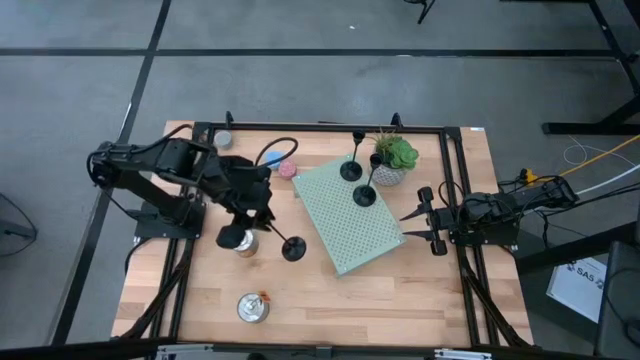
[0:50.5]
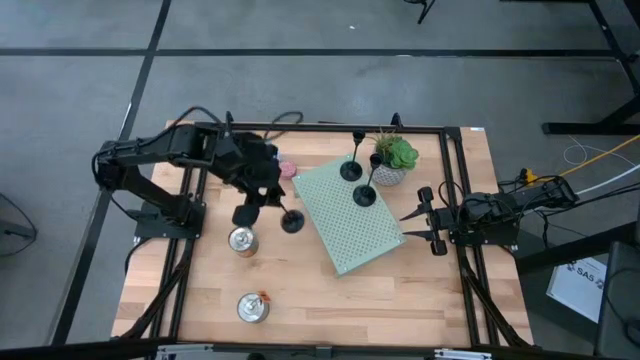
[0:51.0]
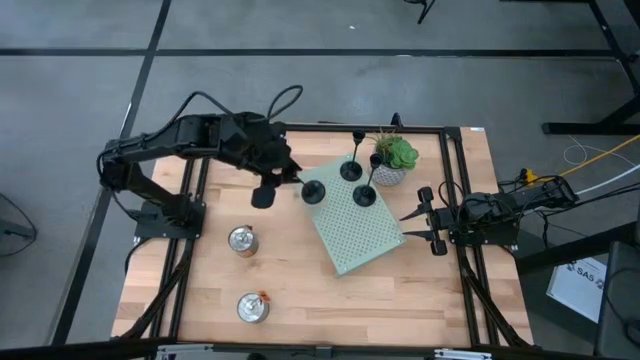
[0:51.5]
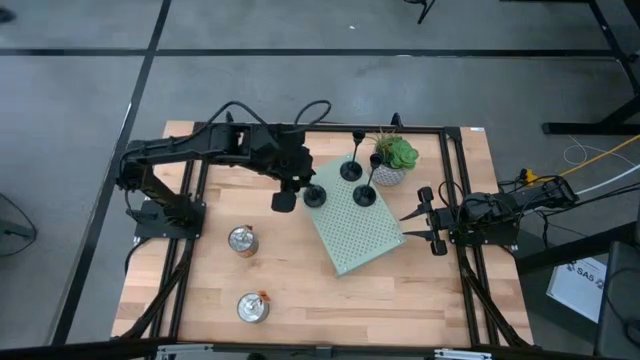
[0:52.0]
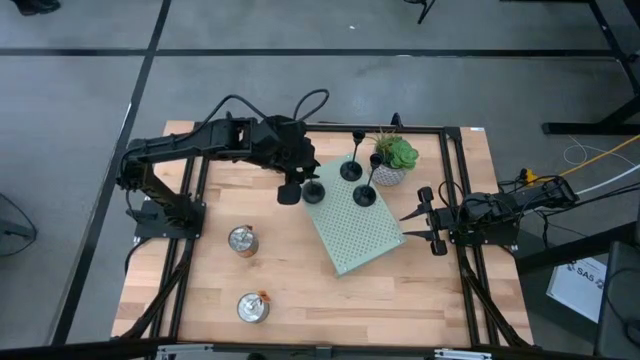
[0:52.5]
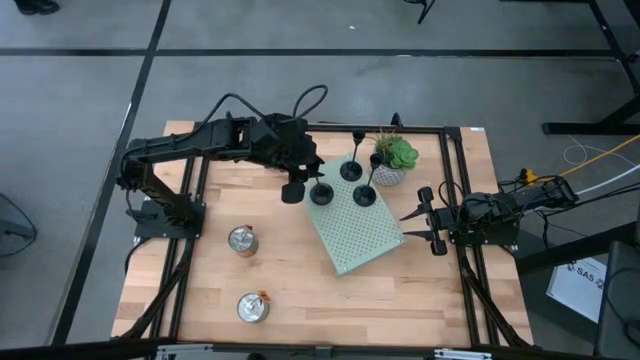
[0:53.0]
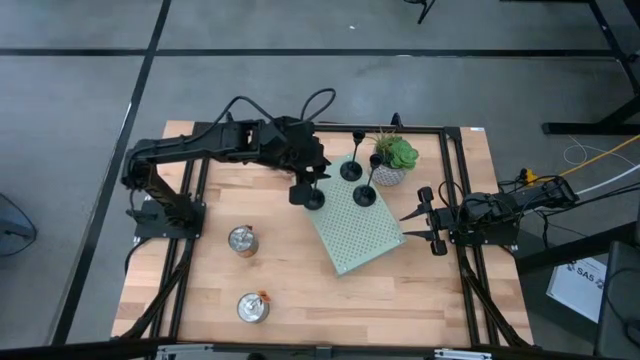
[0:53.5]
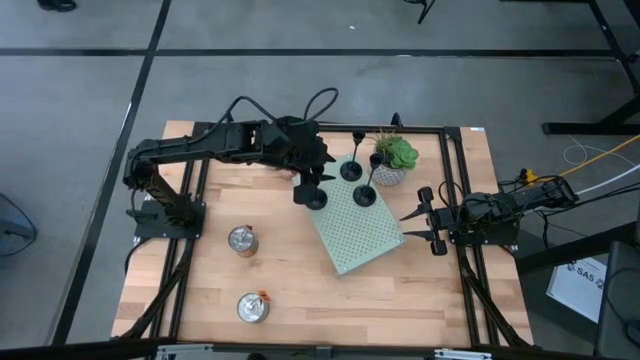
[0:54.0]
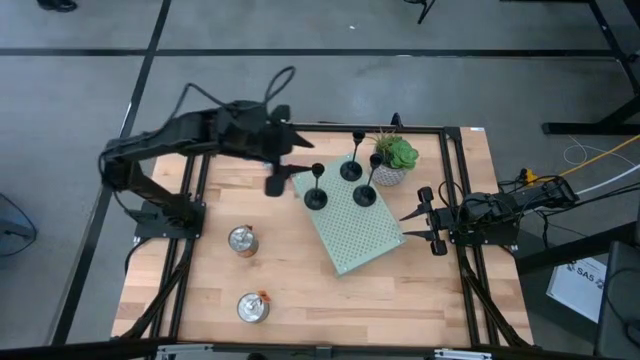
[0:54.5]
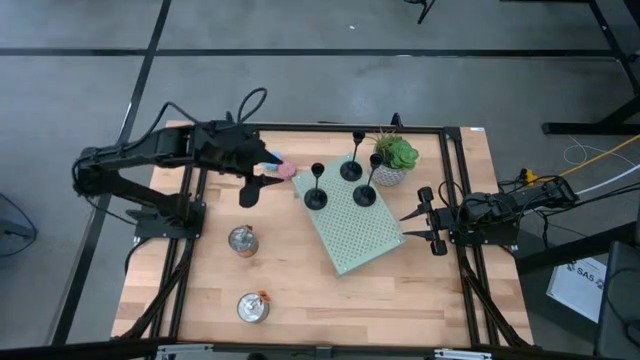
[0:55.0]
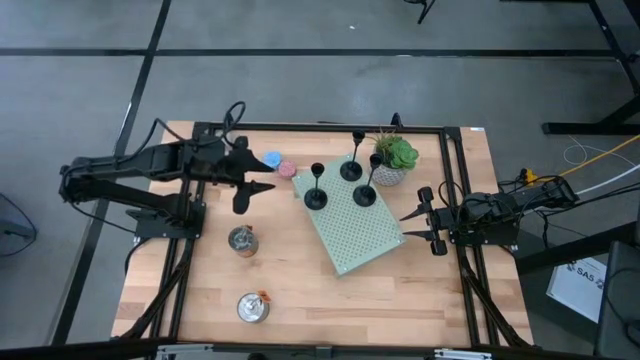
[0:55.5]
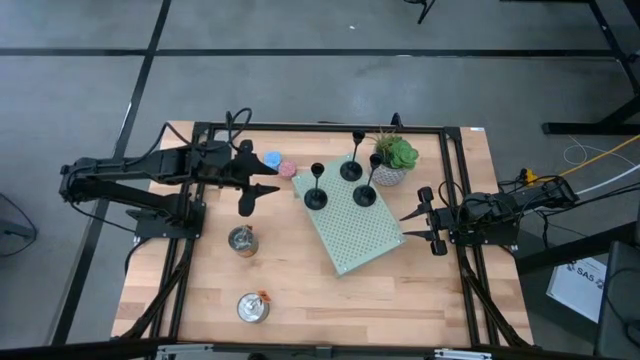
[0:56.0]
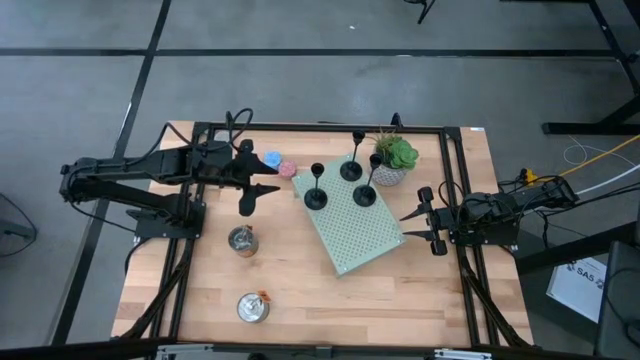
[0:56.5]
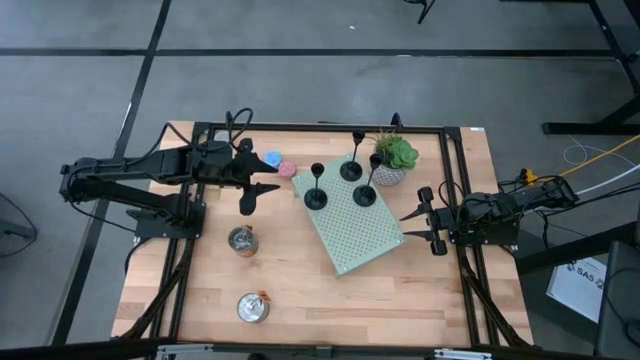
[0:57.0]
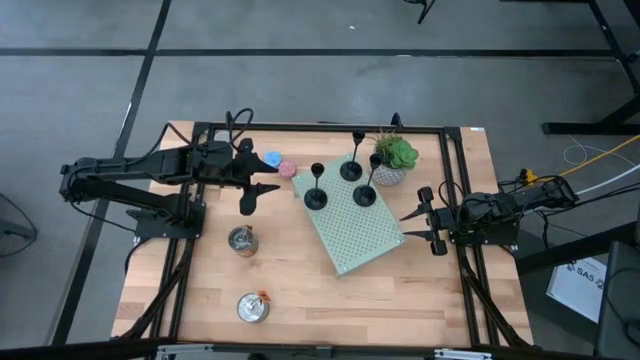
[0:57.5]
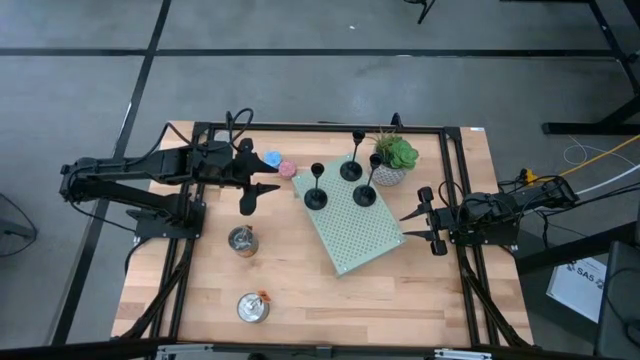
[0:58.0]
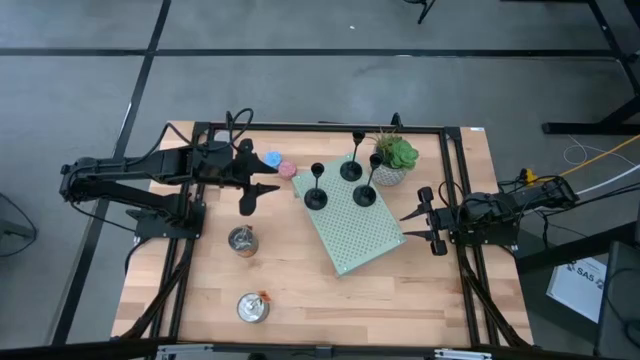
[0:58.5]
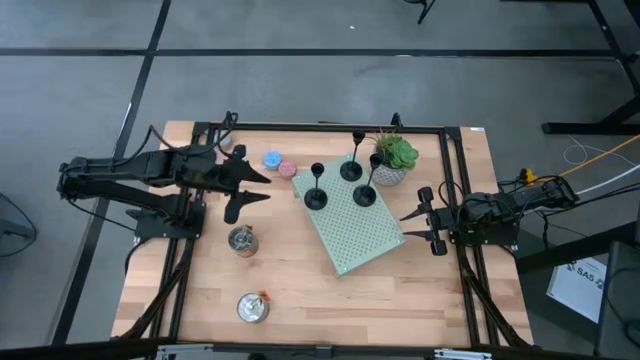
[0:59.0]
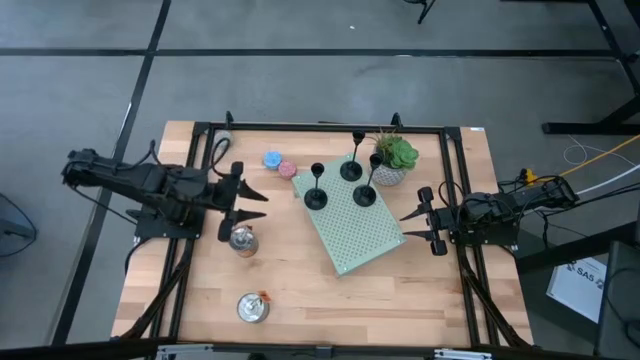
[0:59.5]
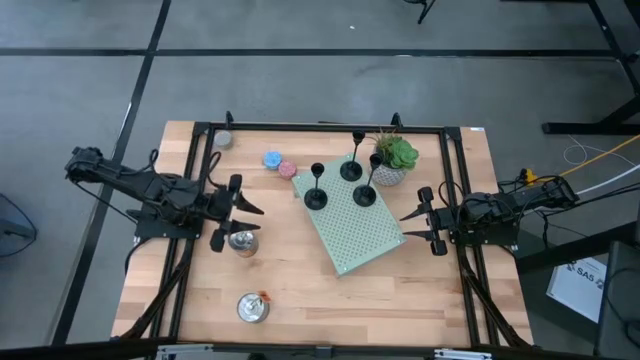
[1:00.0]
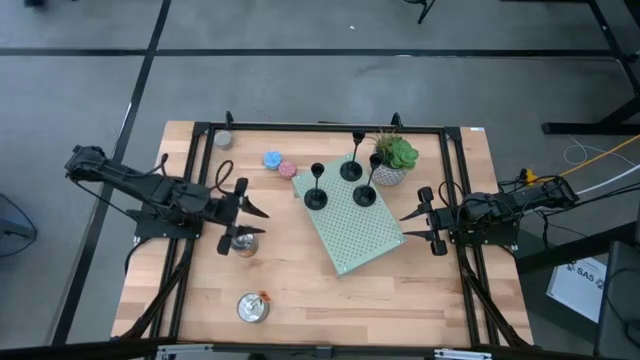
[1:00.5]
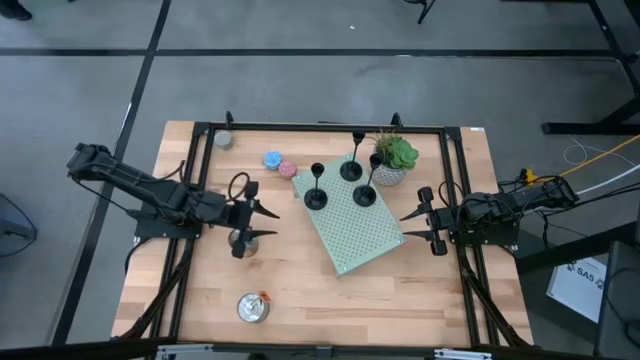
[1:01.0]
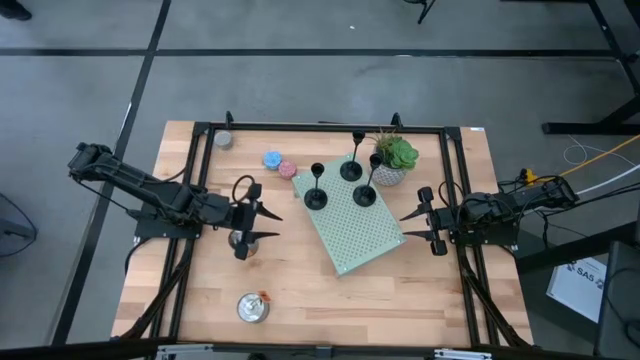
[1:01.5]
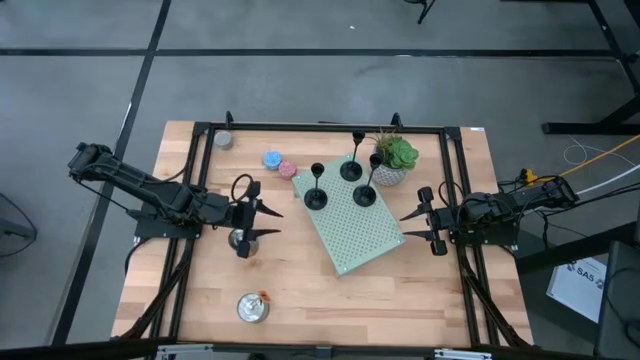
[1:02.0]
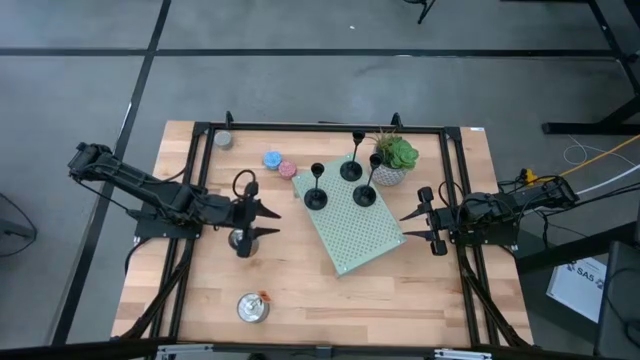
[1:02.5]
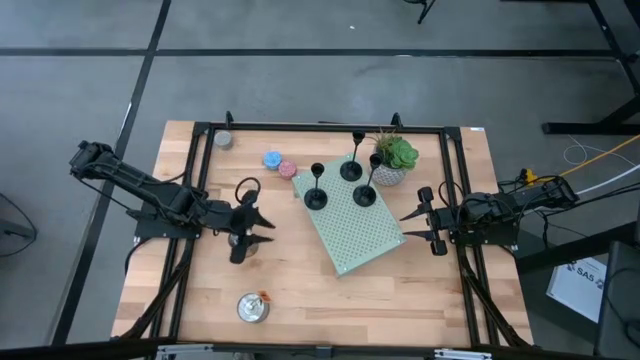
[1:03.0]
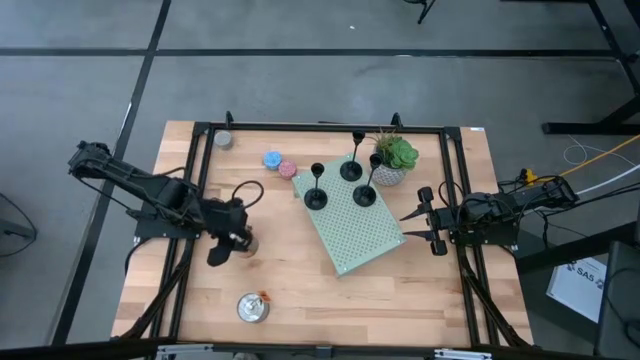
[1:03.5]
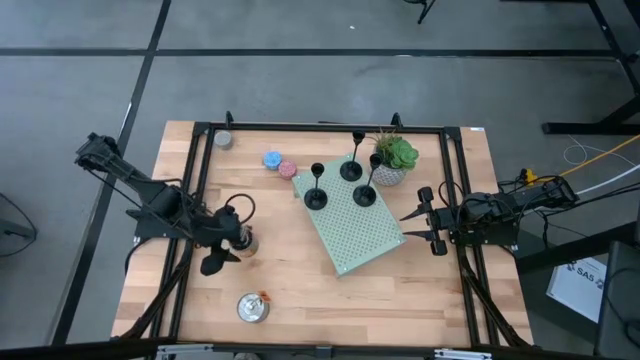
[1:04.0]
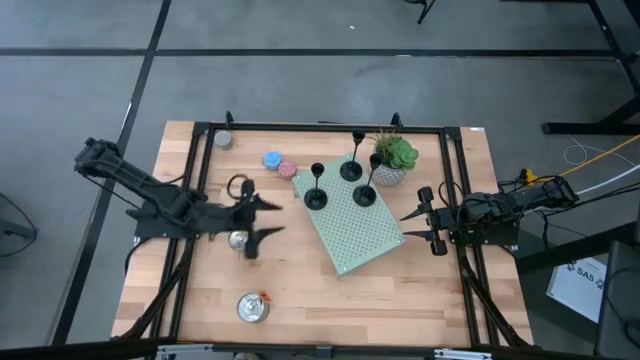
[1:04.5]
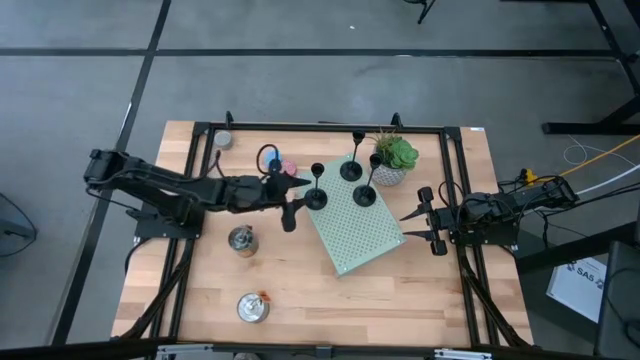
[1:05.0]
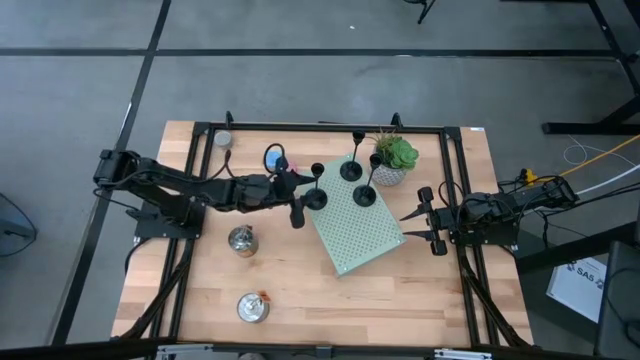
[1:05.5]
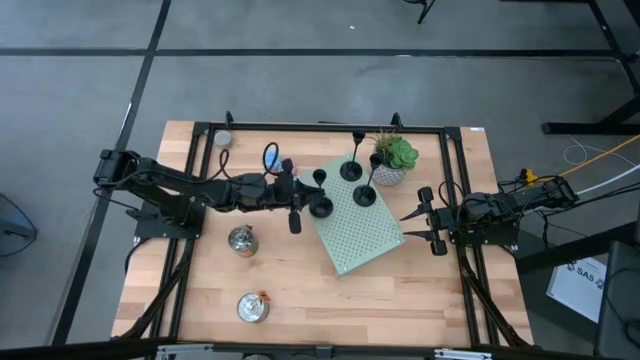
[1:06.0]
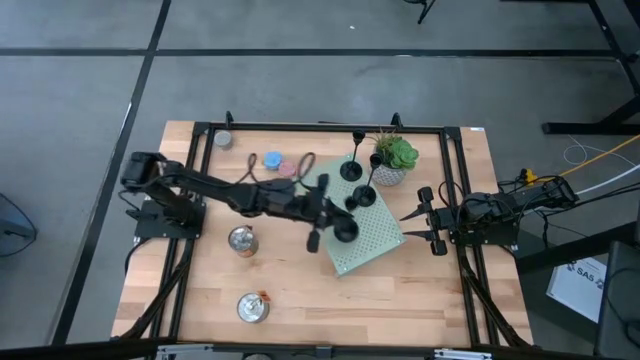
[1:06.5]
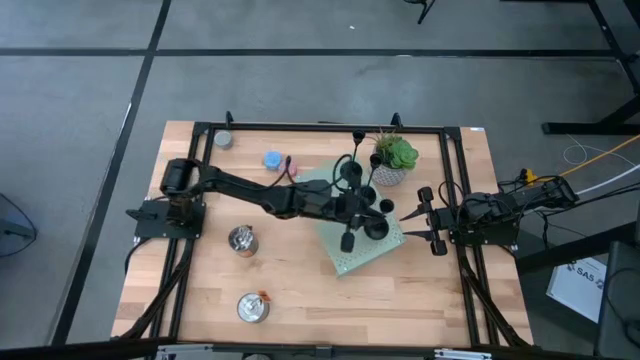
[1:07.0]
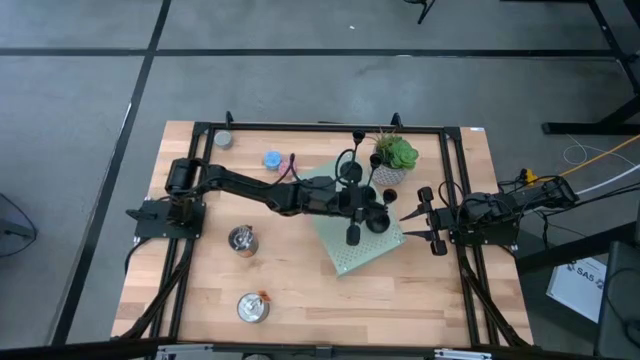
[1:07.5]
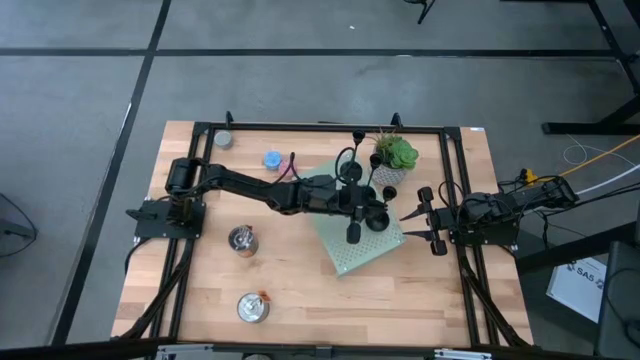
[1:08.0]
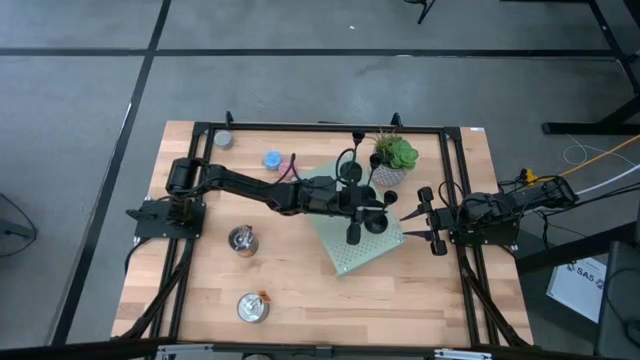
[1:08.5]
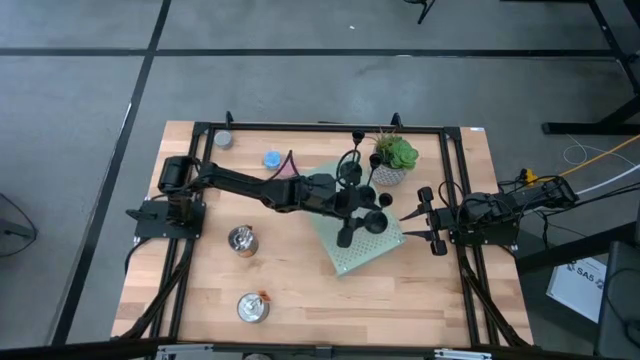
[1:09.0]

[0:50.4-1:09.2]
Task: Pick & Place candle stick holders
Put the black candle holder on the shelf aligned with the other candle holders

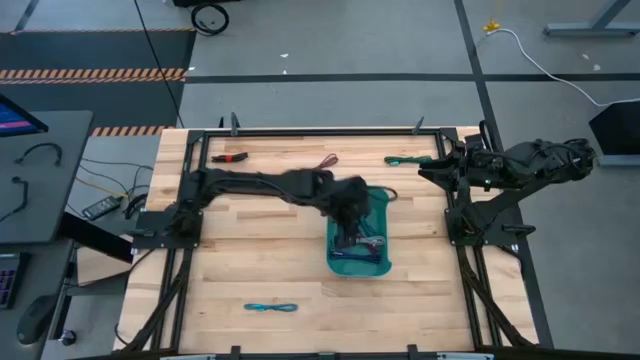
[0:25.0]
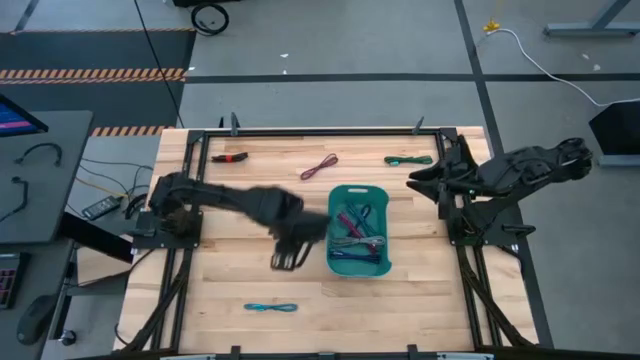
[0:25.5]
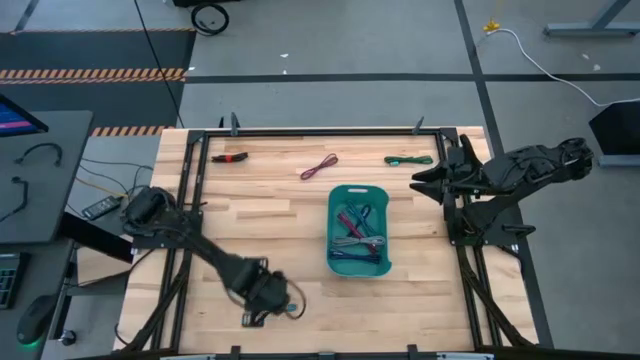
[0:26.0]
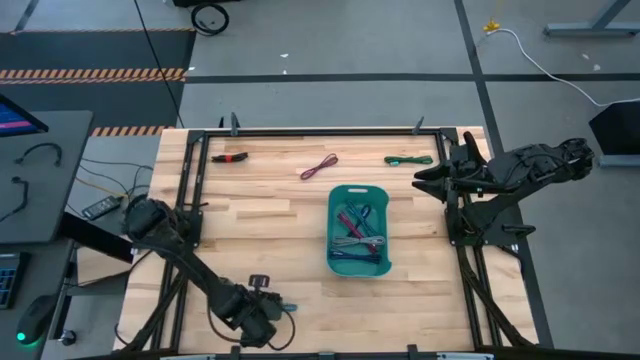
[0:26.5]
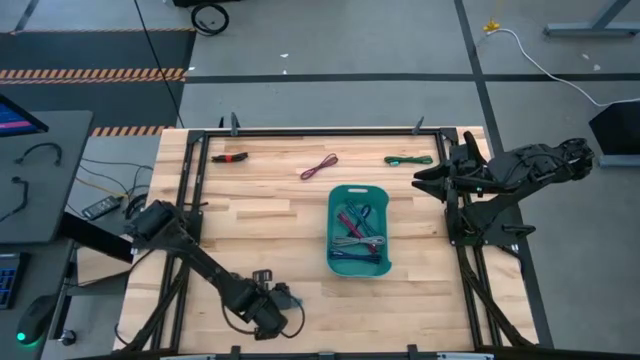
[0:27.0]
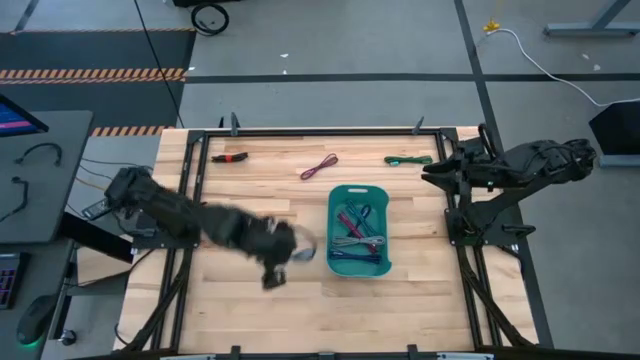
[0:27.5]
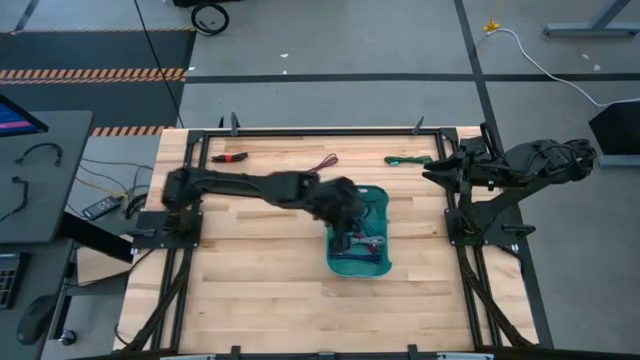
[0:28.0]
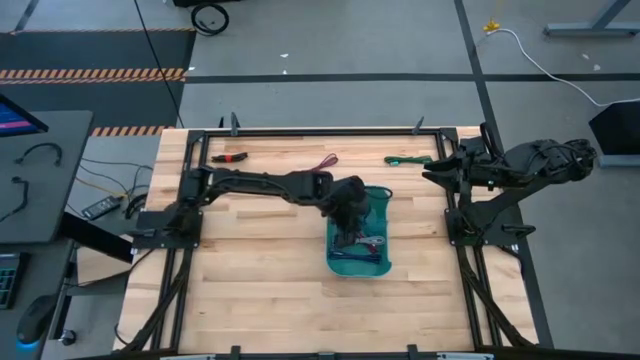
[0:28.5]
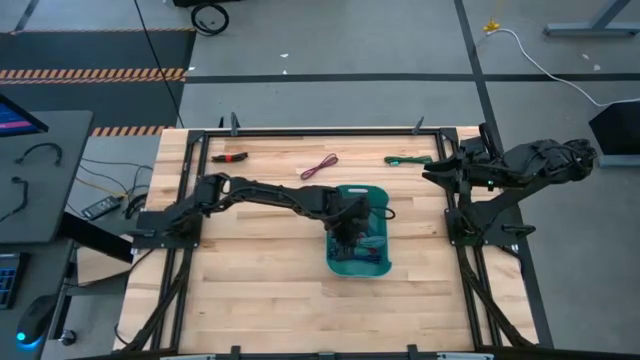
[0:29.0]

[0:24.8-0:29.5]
Task: Pick and place USB-C Cables
Put the light blue USB cable into the light green bin
